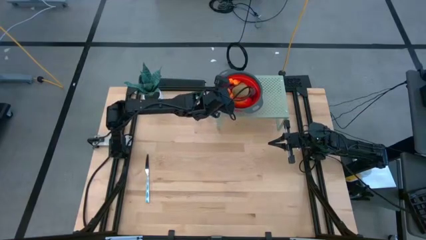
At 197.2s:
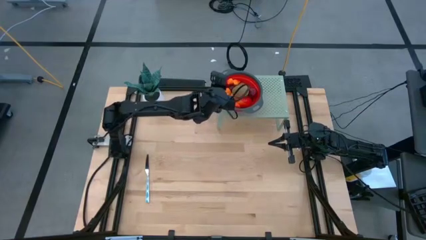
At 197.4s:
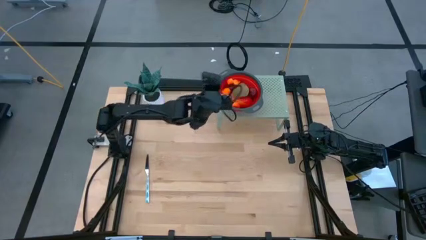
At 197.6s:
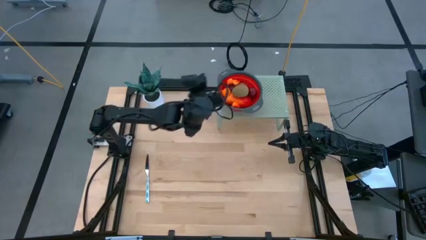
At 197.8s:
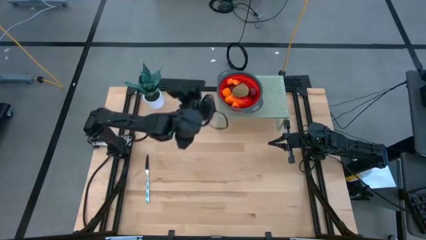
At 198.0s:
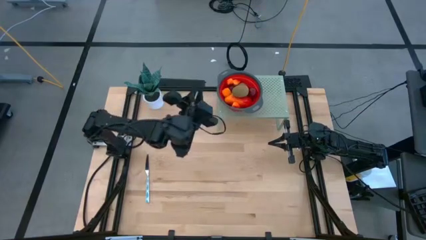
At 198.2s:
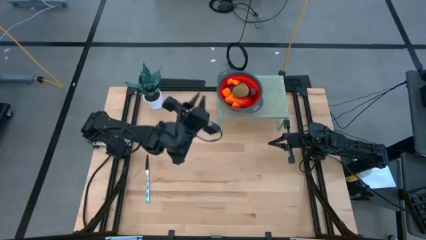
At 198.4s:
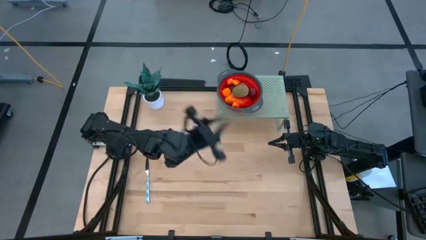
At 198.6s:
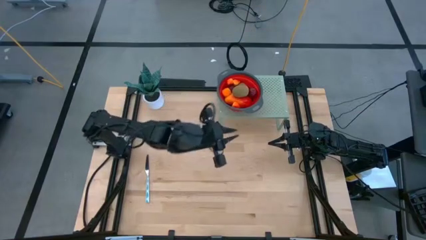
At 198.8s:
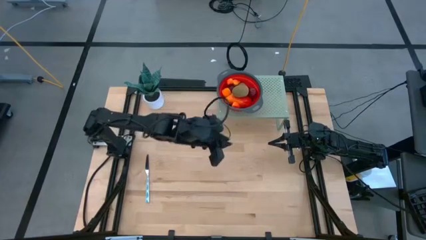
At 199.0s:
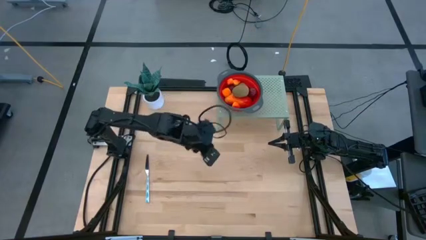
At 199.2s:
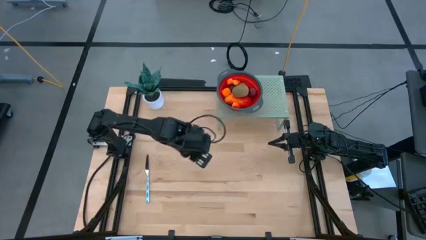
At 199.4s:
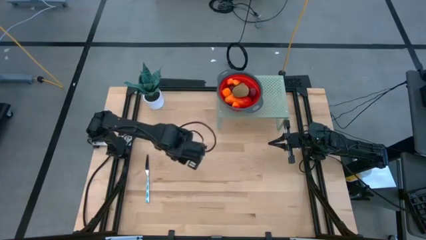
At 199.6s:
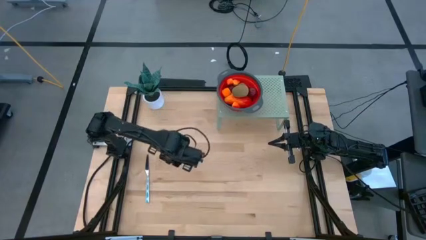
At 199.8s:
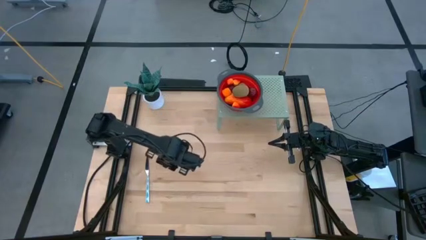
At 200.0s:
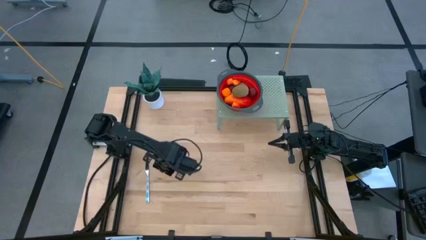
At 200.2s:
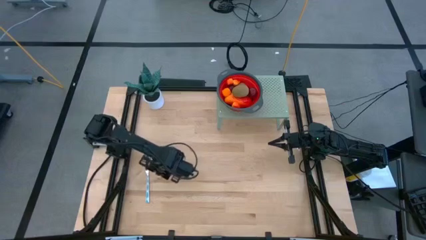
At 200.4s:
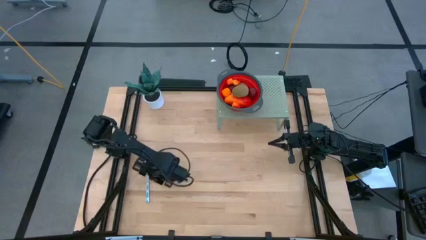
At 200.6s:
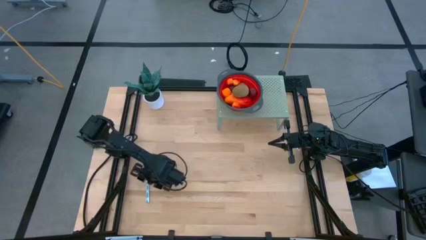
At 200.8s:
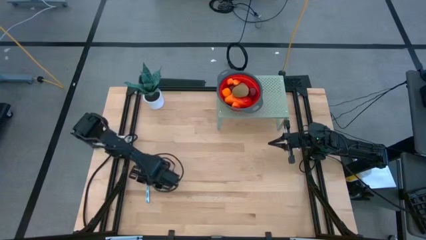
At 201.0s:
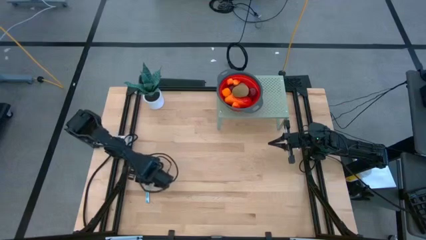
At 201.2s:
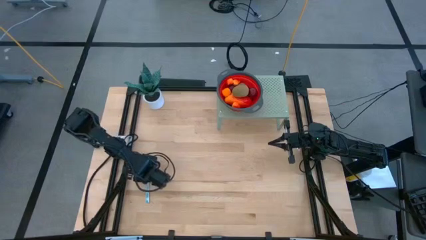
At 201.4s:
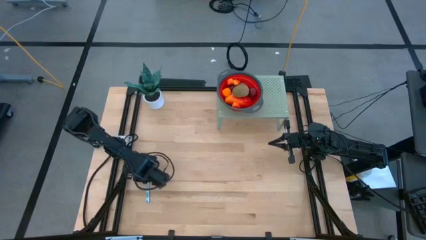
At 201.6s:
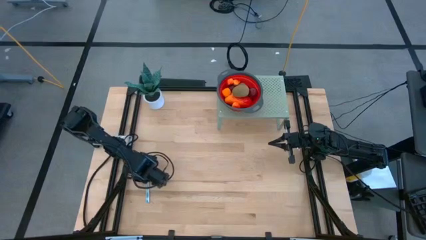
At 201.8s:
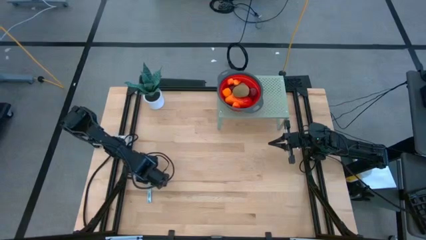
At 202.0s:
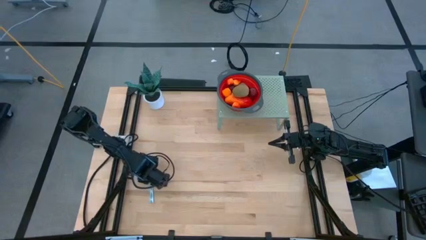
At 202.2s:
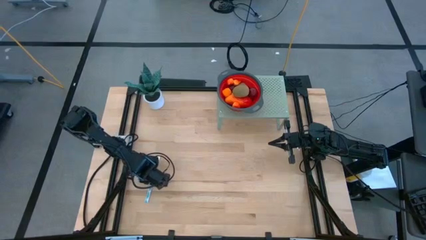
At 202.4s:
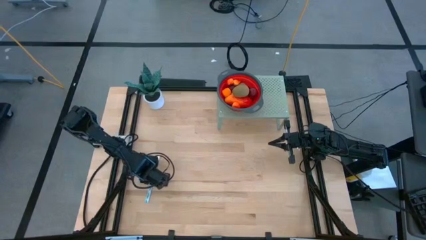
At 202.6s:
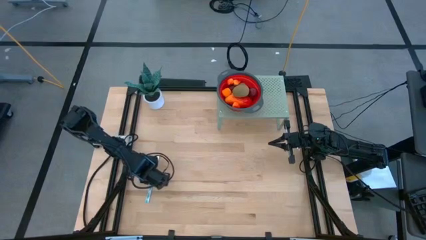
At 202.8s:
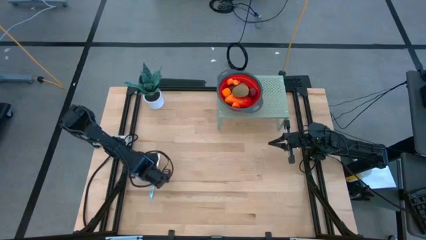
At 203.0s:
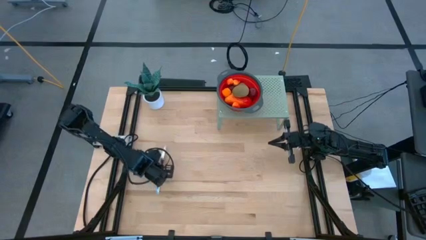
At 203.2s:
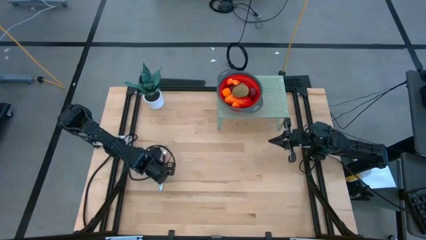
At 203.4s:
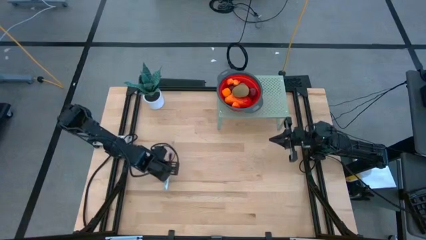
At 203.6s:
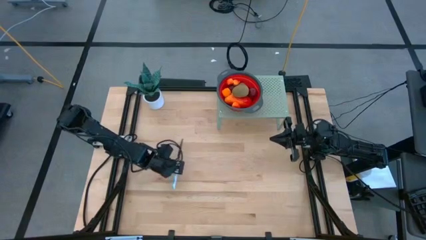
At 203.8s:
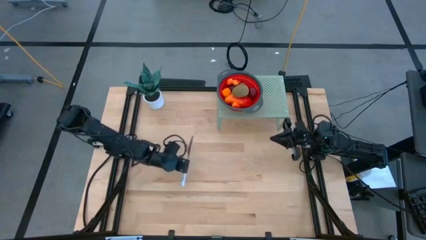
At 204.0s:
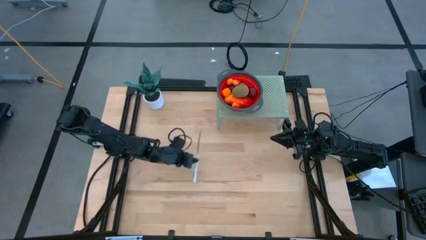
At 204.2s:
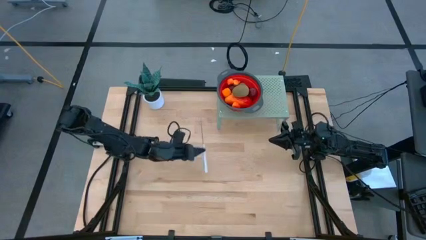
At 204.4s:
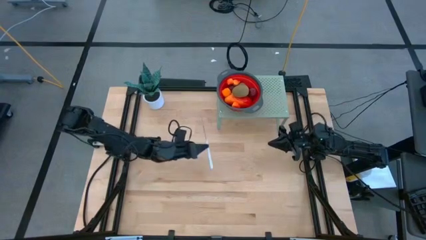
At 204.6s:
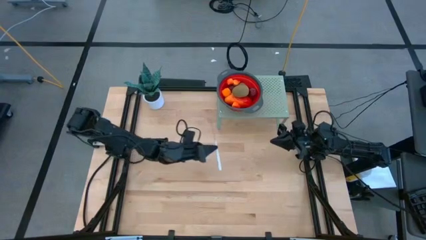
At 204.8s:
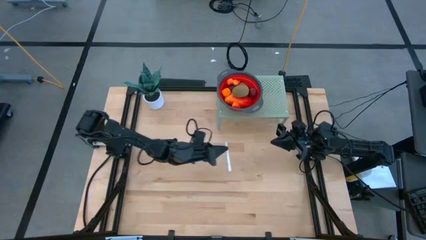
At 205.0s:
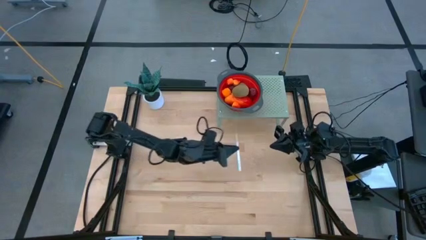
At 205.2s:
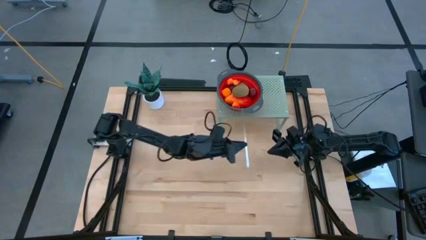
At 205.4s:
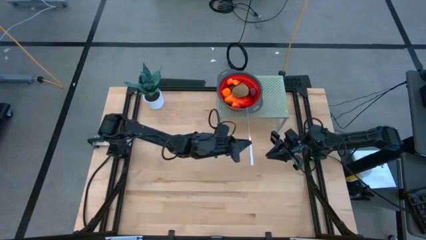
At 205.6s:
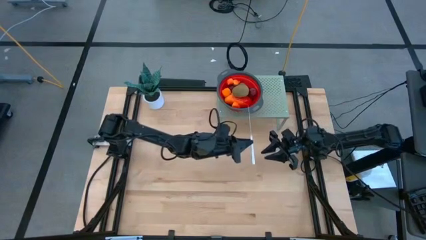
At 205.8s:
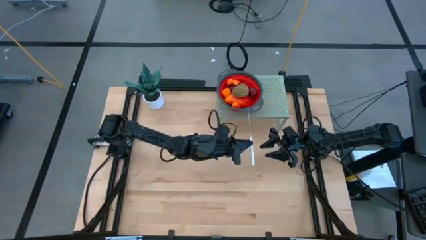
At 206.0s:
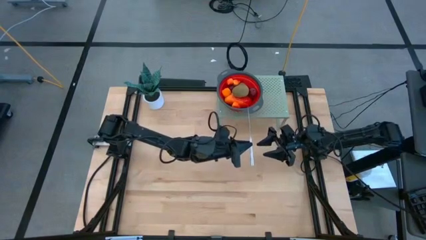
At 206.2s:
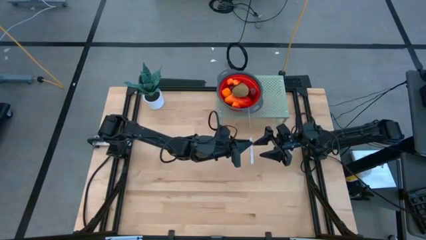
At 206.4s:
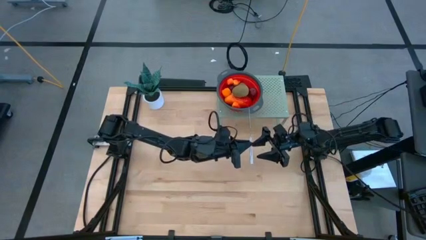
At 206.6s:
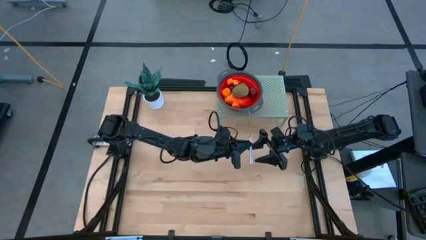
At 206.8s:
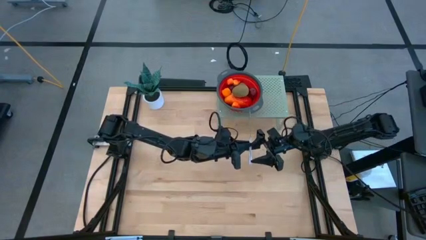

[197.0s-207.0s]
Task: Pick & Place Fruit
Put the white knife on the shelf

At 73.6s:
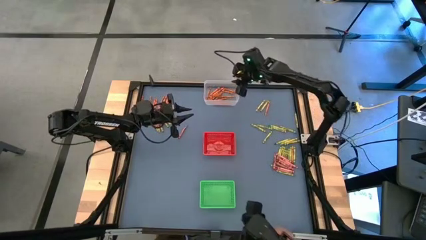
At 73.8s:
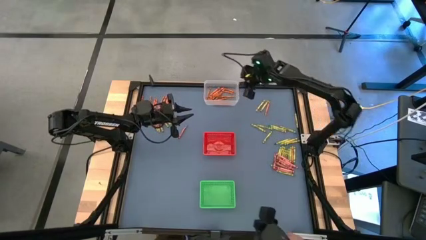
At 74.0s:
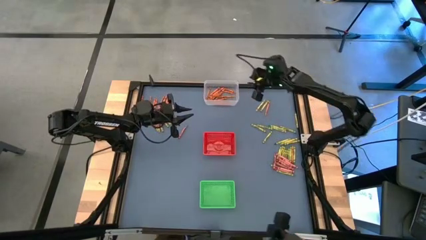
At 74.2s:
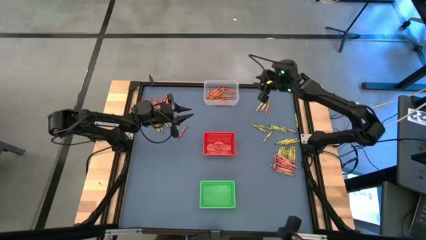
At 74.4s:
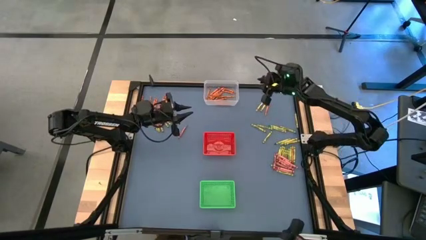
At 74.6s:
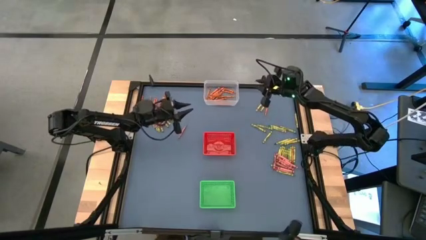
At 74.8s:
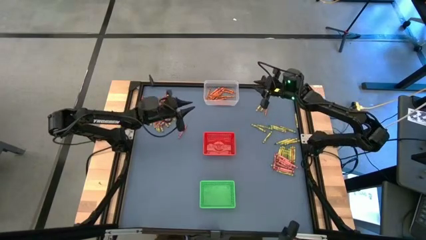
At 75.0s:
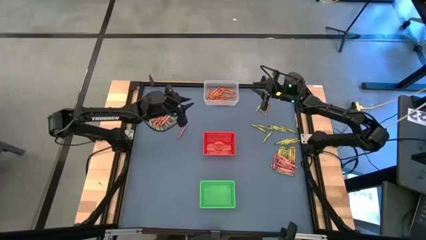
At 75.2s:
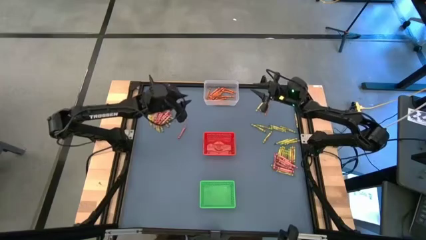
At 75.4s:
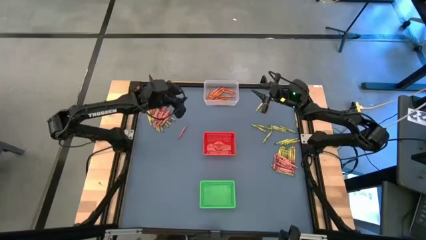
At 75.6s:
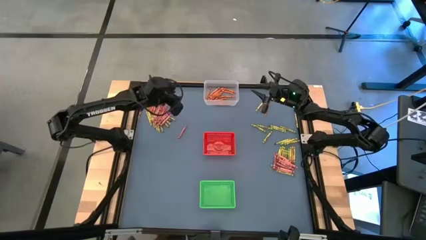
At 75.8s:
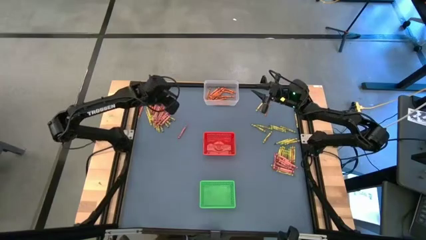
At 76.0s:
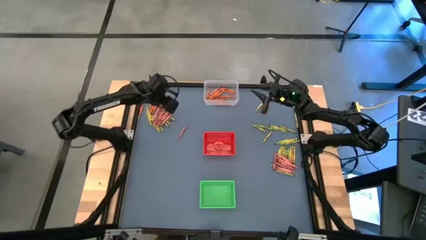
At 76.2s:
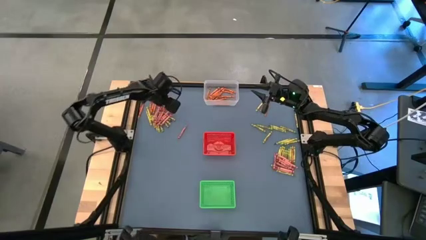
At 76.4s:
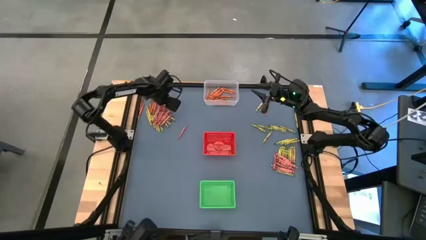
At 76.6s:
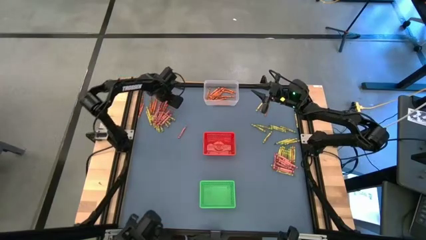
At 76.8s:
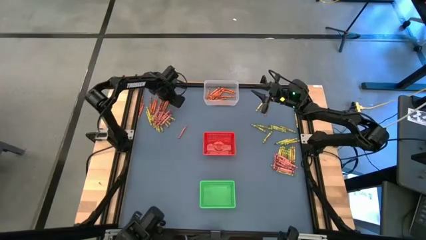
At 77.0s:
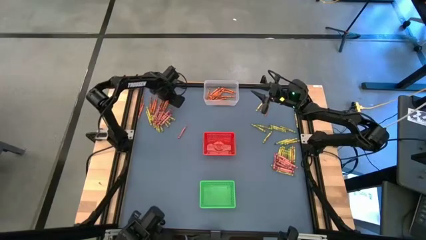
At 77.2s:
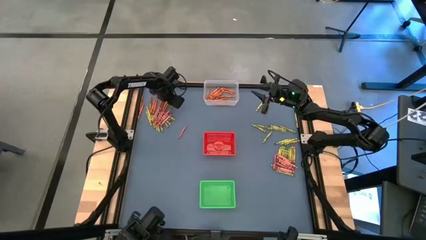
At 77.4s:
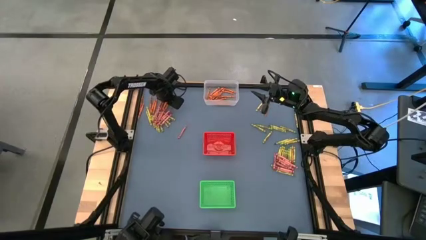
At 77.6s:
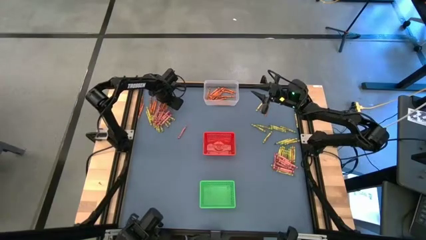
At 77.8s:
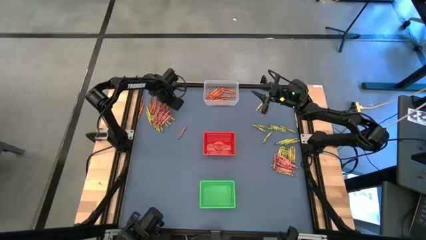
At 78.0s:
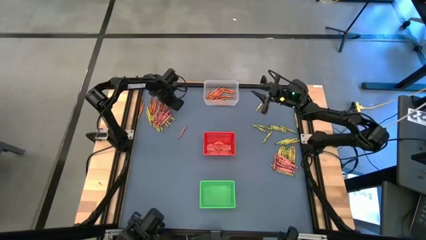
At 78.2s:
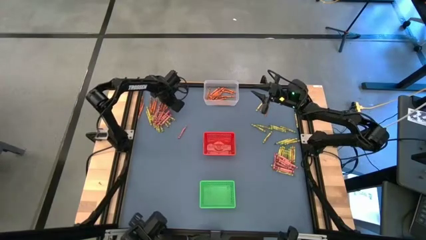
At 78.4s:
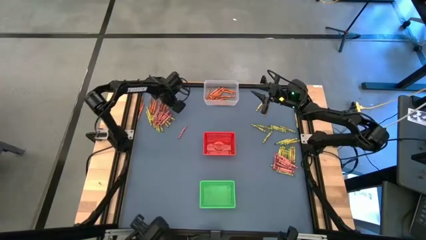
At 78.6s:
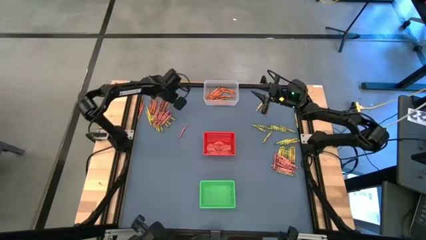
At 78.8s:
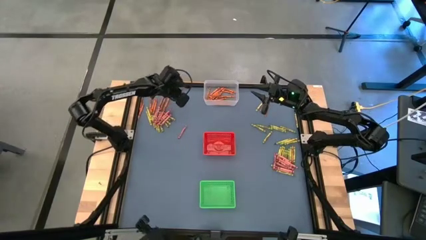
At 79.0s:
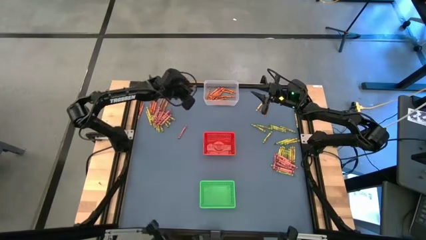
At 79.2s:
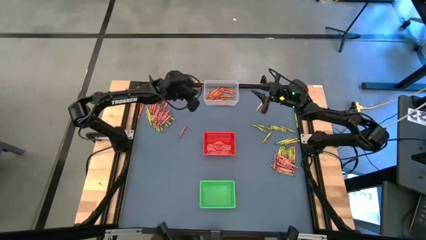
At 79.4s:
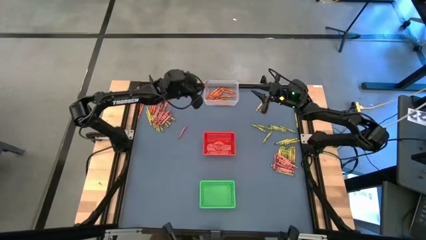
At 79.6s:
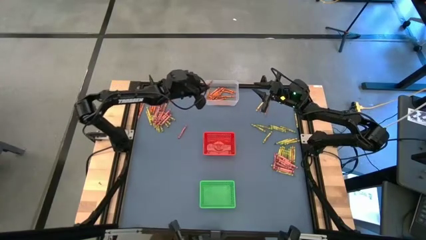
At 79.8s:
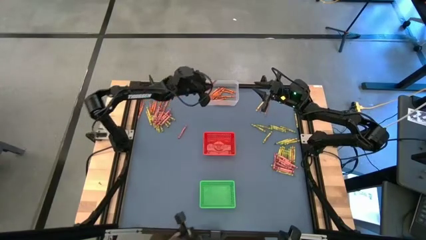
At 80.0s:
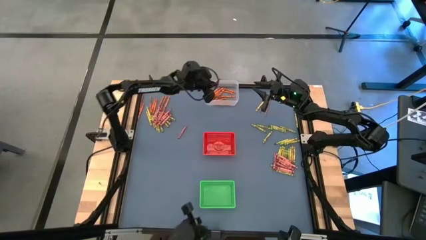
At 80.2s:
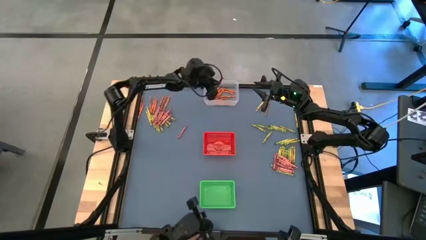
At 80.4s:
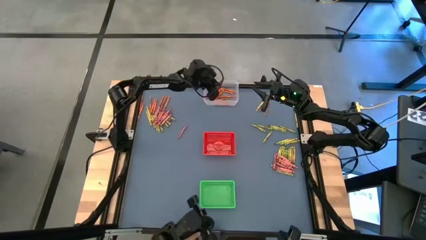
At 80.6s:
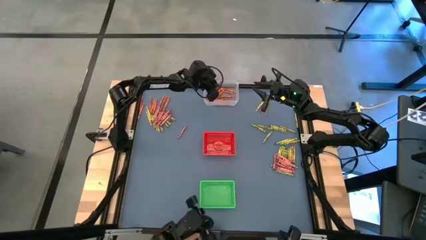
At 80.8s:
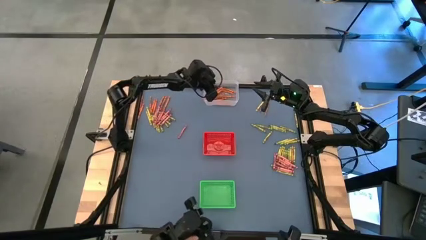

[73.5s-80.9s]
Task: Sort crayons
Put the orange crayon into the transparent bin
